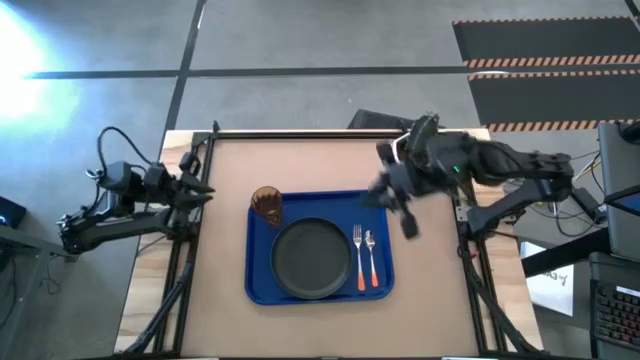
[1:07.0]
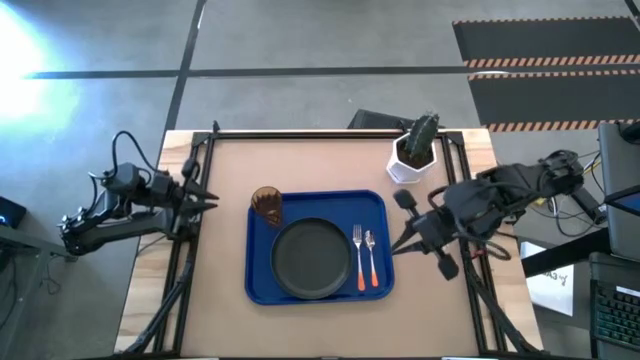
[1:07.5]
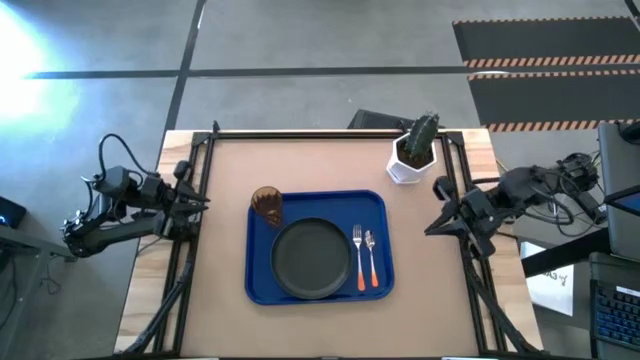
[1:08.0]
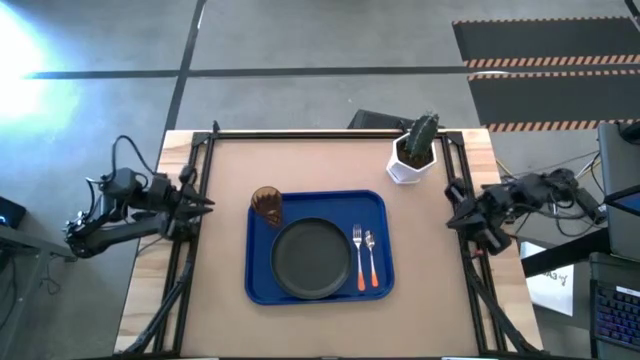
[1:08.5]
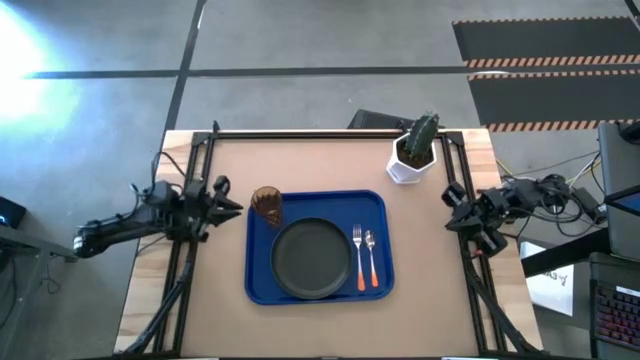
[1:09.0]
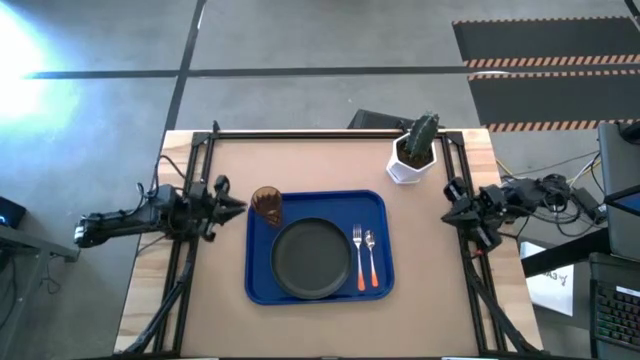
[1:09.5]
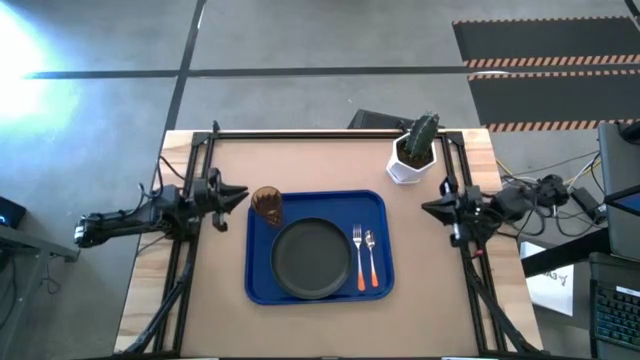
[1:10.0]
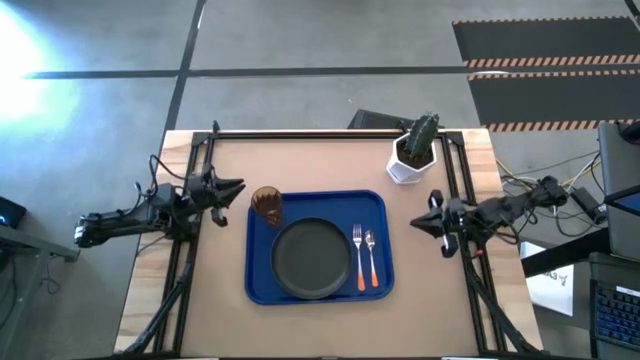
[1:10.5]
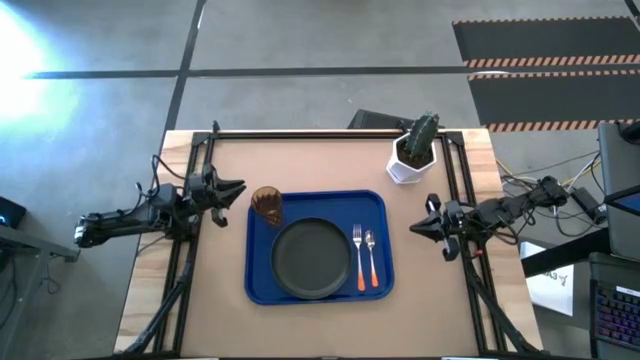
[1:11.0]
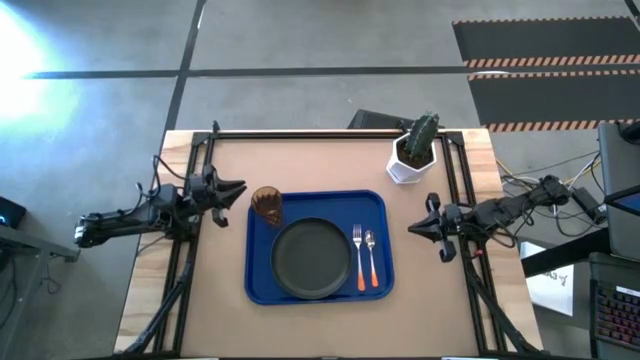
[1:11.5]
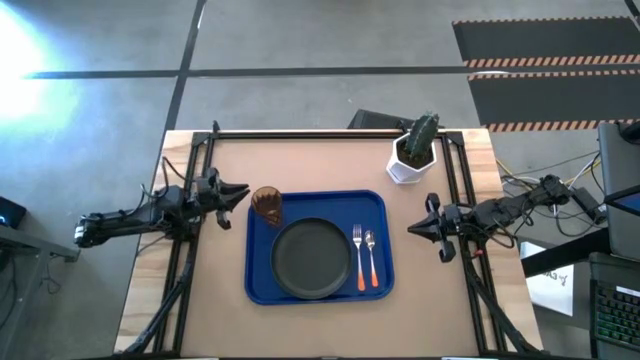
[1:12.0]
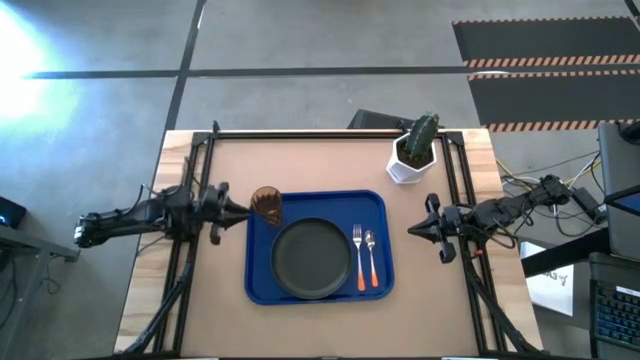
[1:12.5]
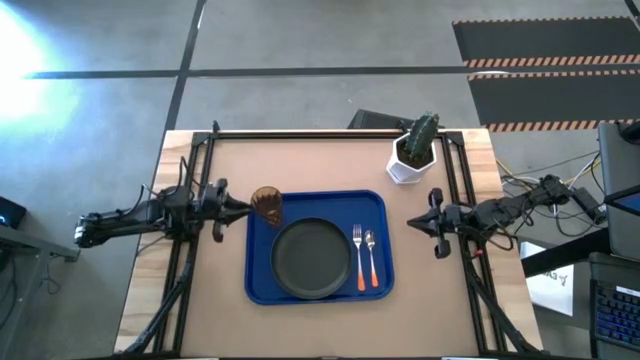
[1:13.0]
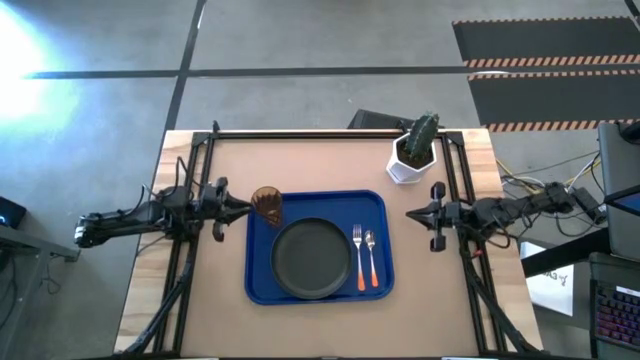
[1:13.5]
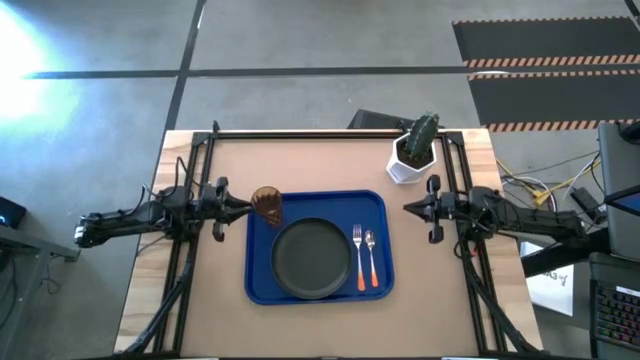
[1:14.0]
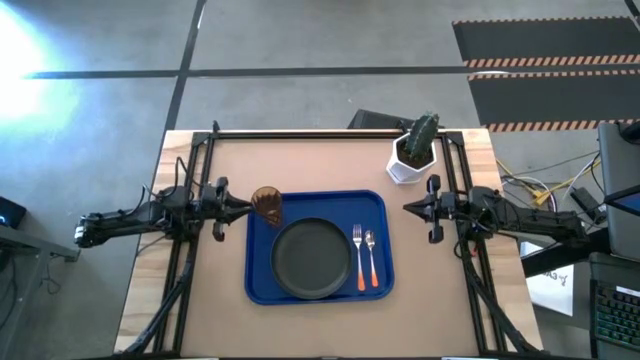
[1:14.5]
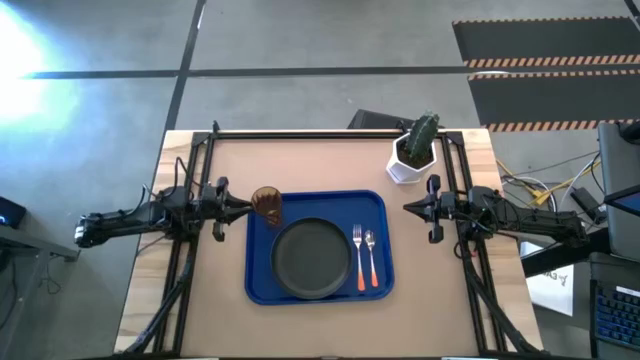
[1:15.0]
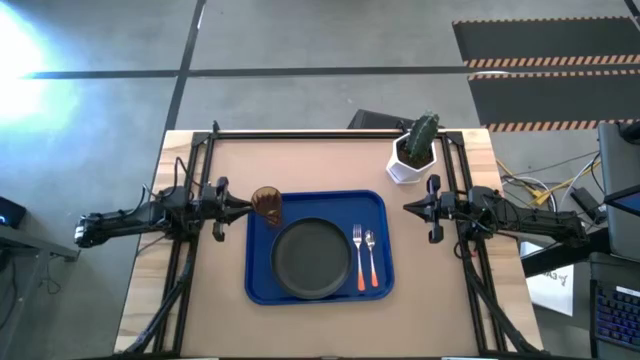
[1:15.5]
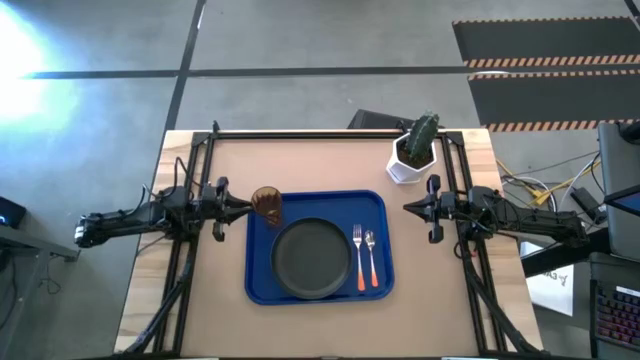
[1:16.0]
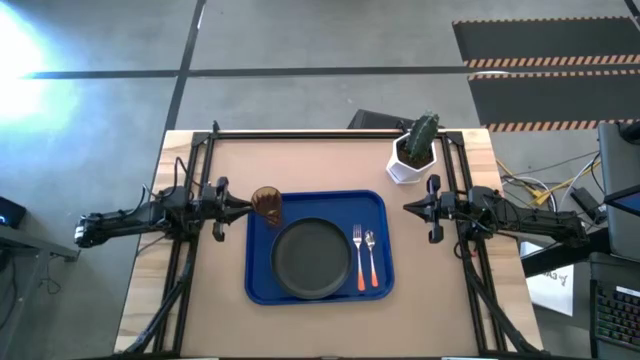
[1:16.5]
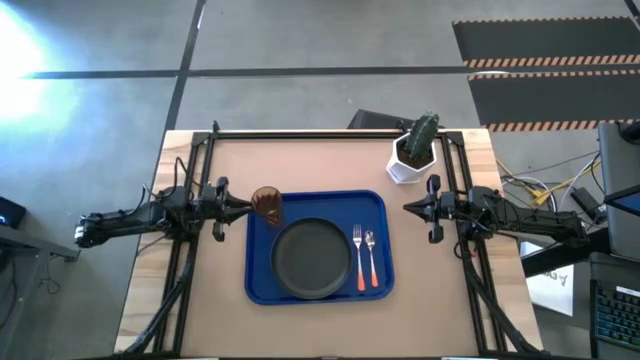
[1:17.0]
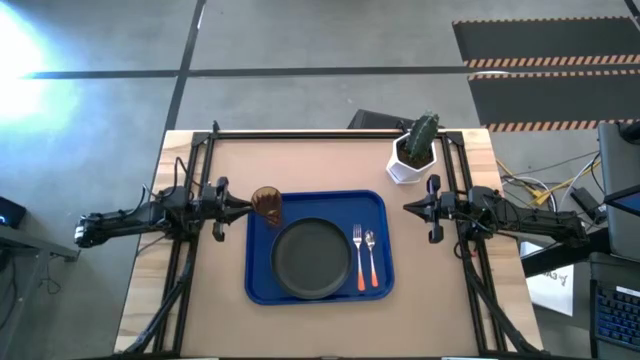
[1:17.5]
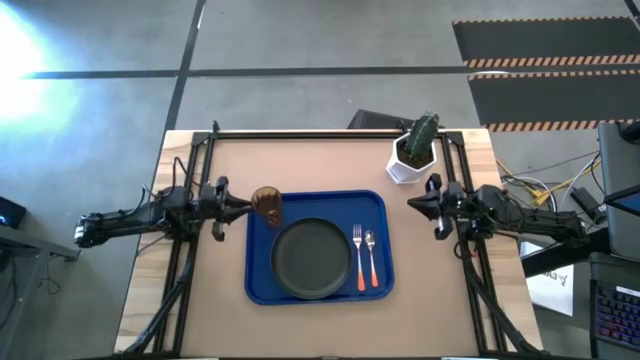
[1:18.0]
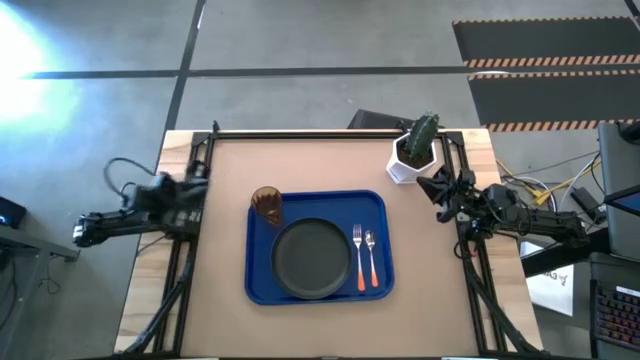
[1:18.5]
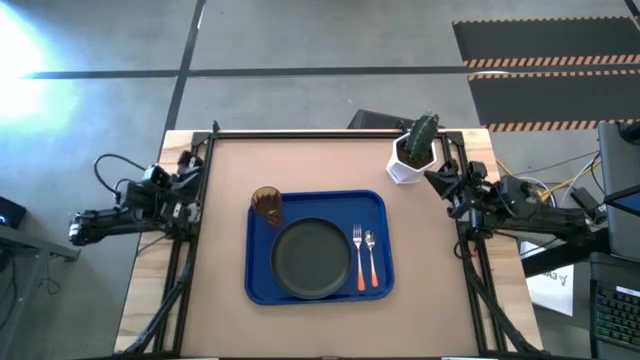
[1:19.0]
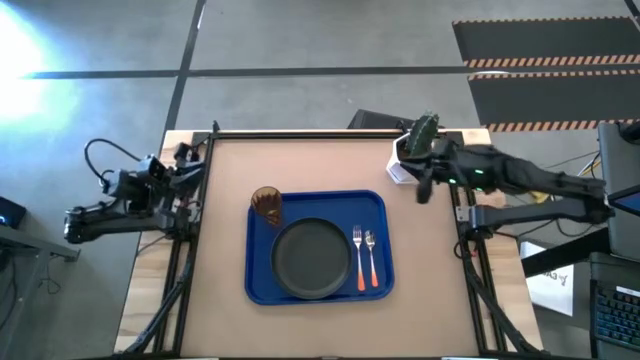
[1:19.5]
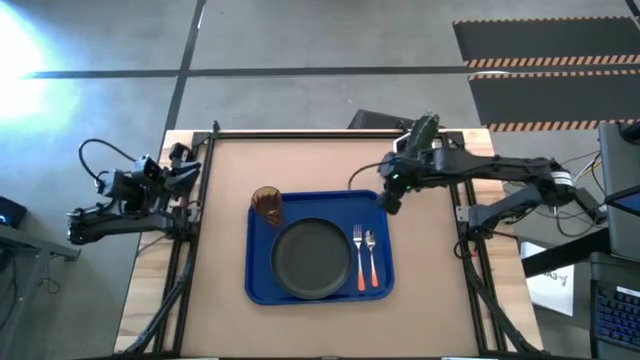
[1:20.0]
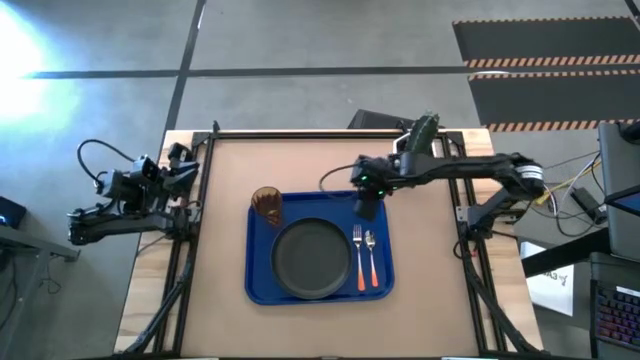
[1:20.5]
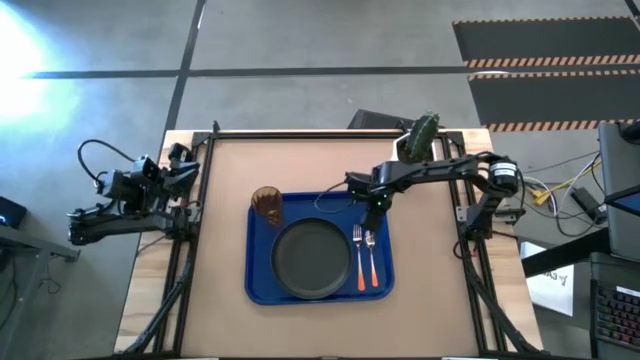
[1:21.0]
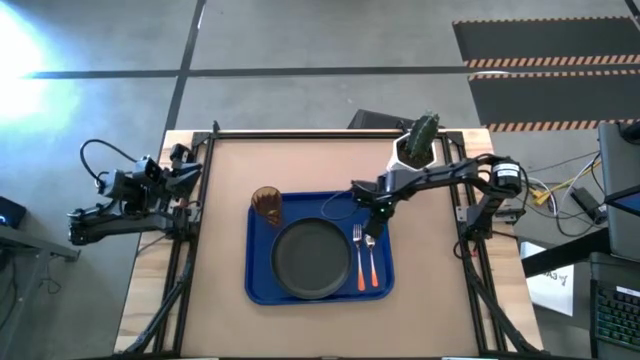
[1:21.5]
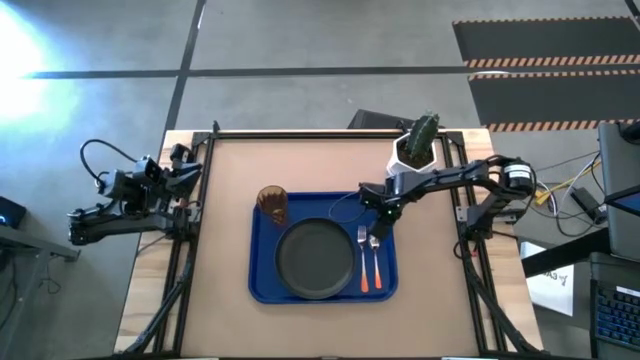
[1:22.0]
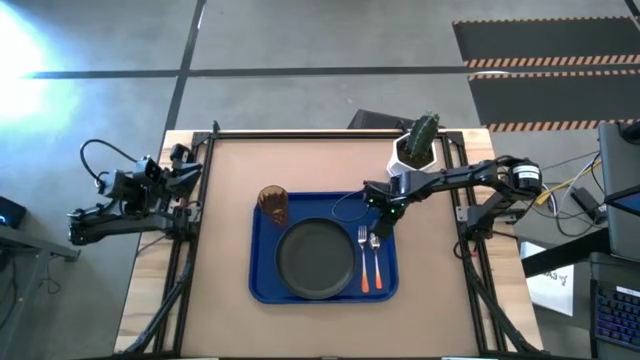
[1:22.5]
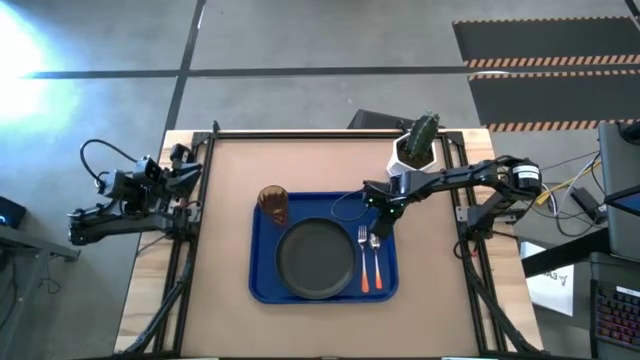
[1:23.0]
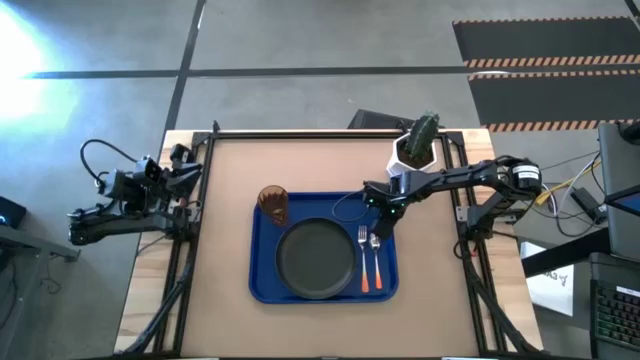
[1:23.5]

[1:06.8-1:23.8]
Task: Pick and place plate/cup/fork/spoon on tray
Adjust the blue tray on the table
